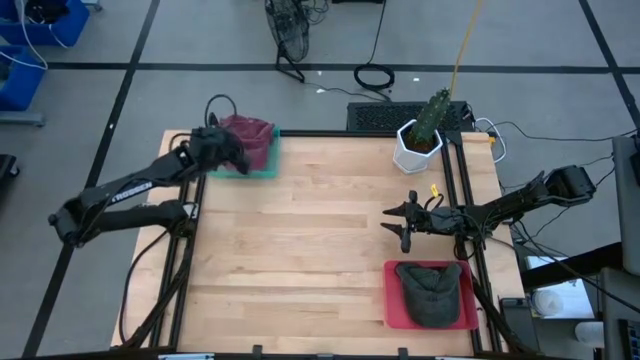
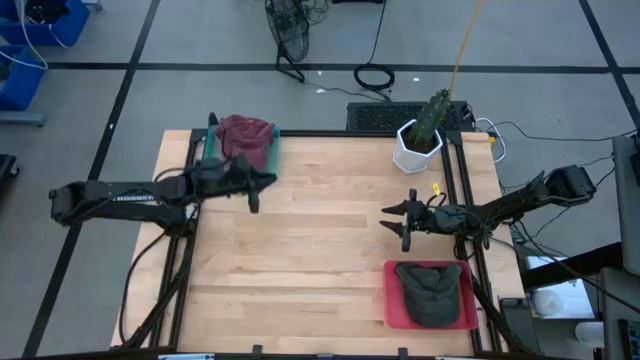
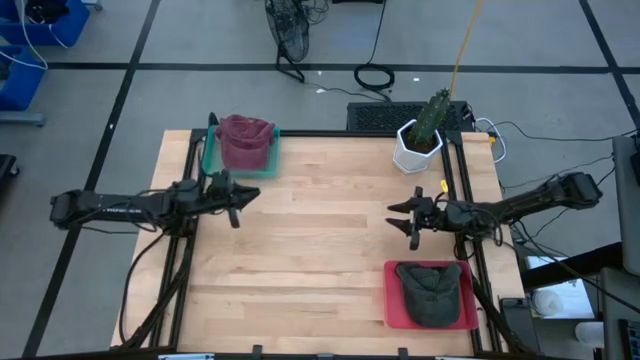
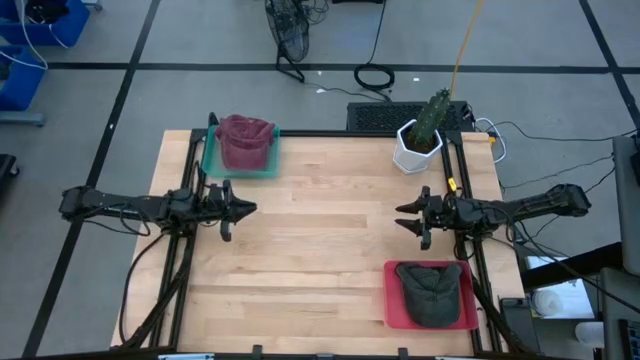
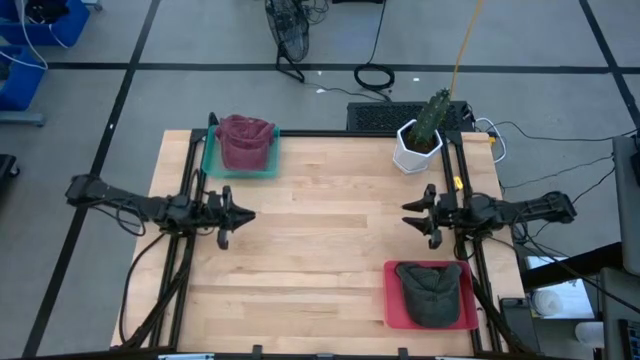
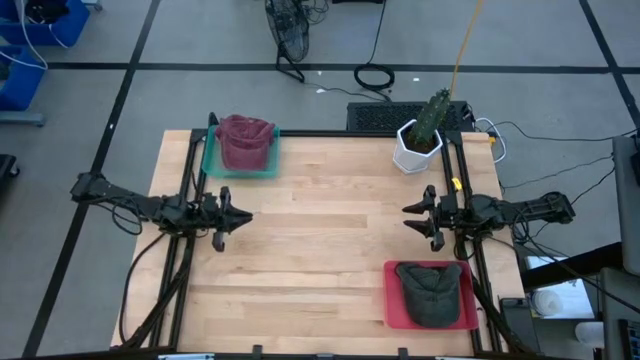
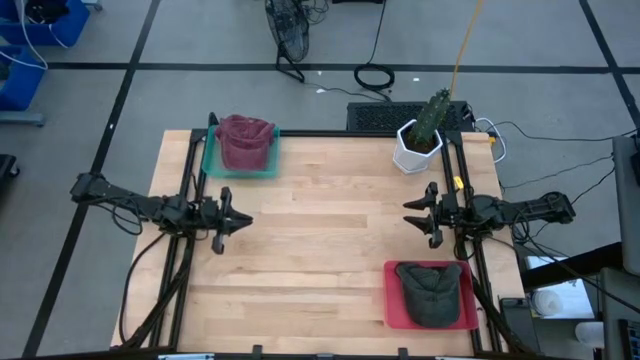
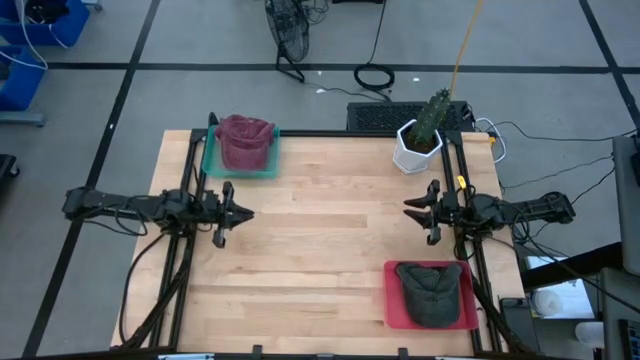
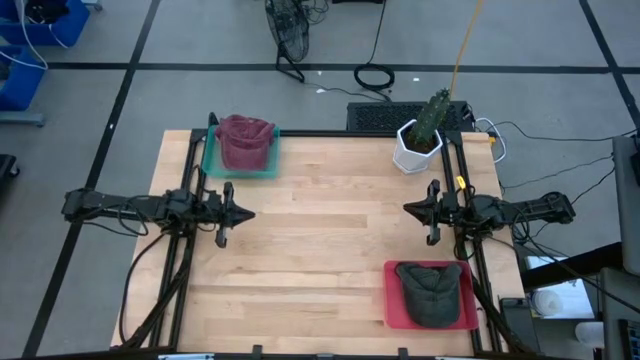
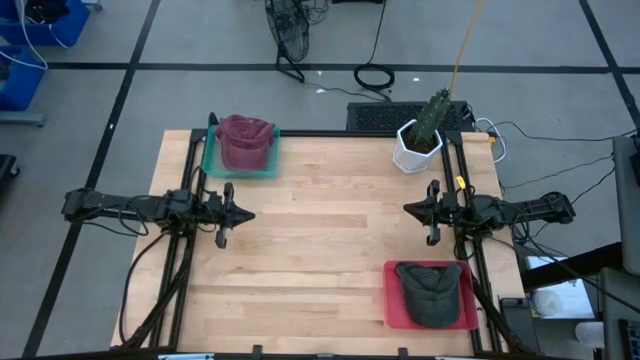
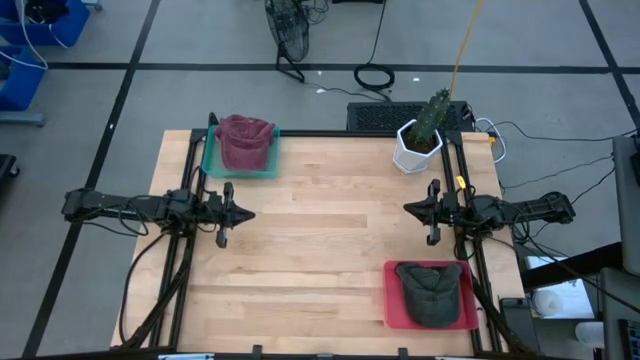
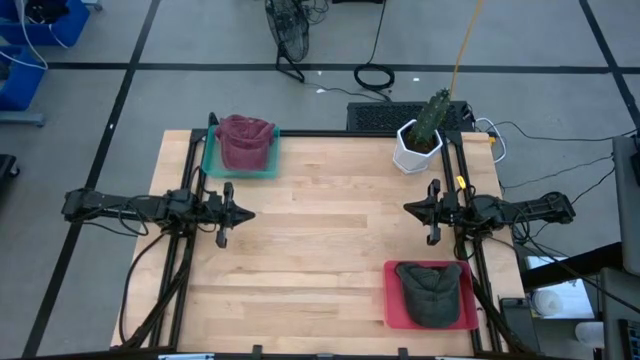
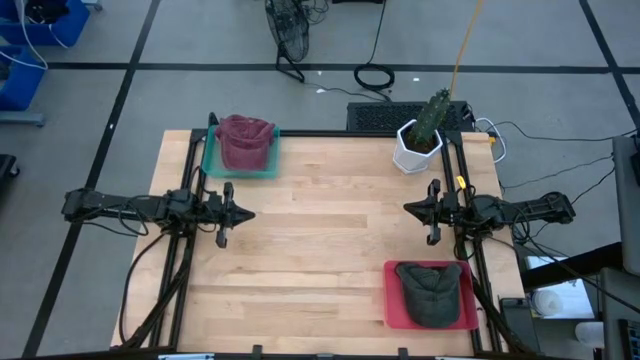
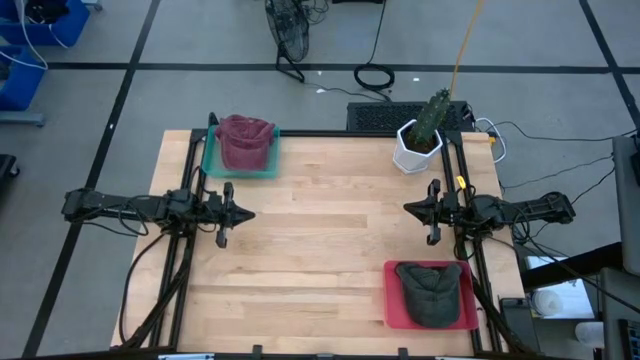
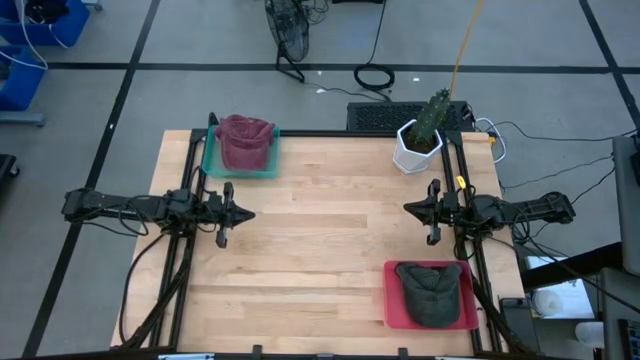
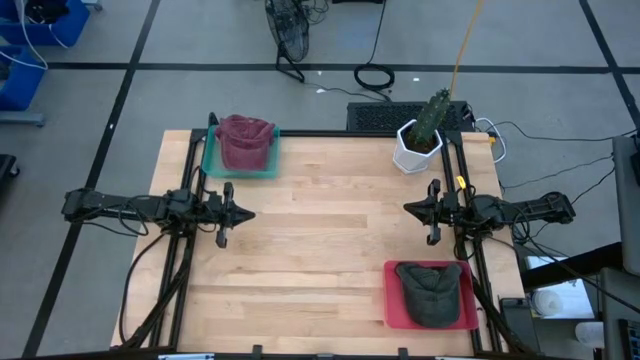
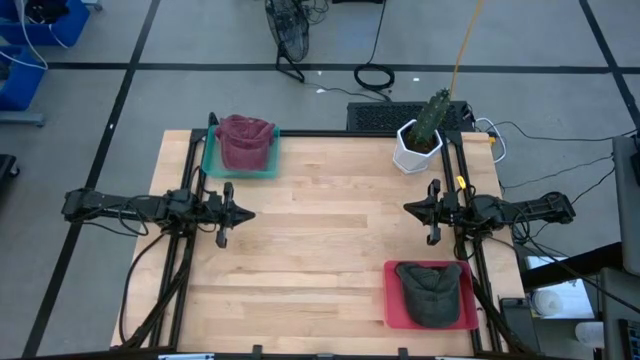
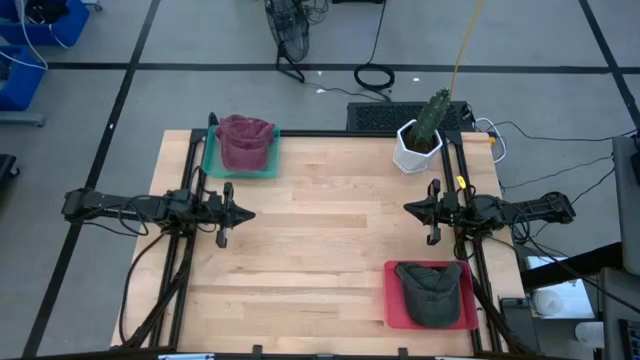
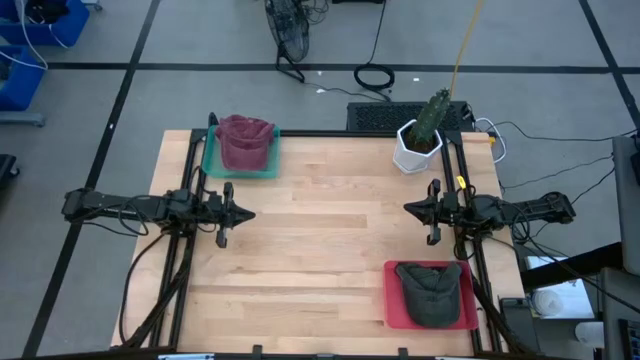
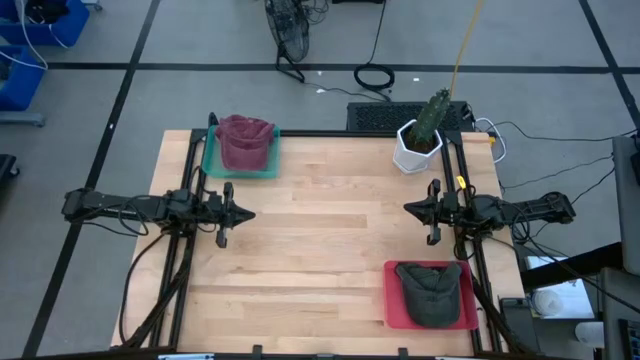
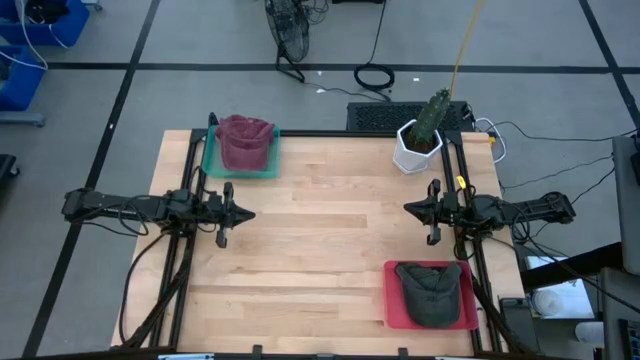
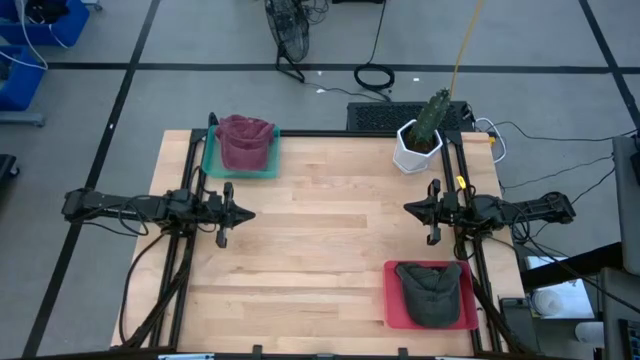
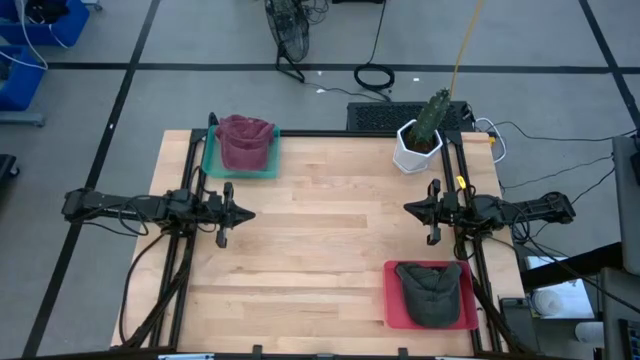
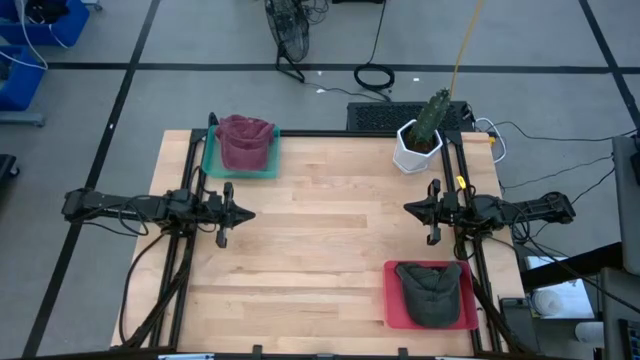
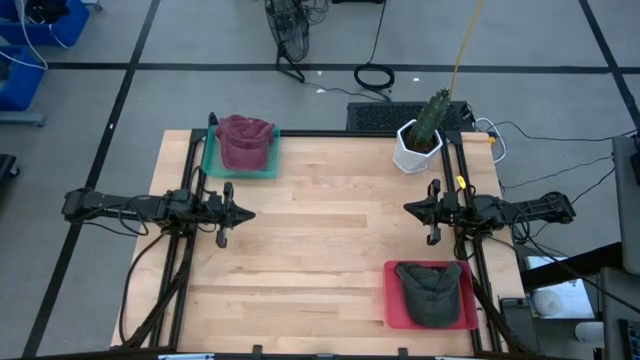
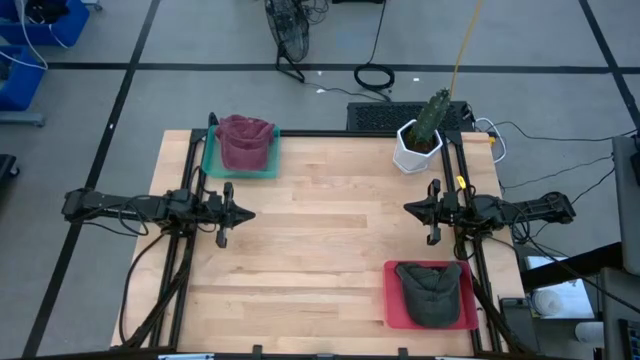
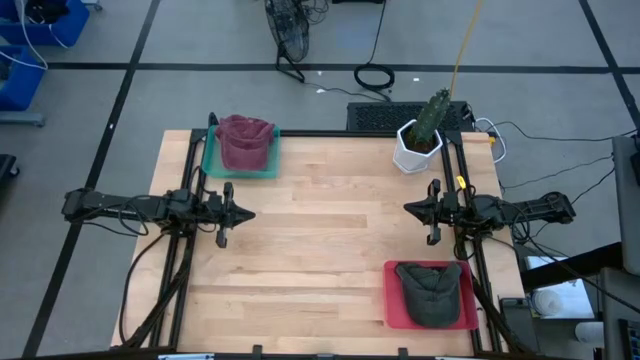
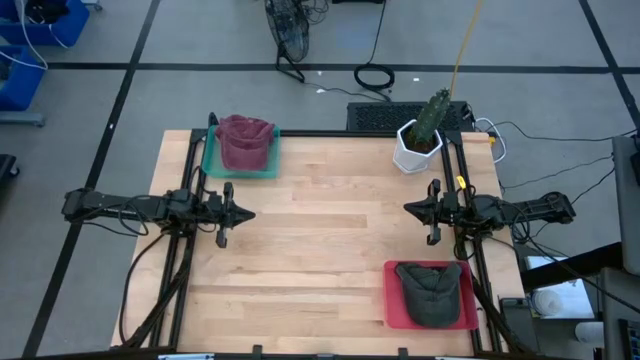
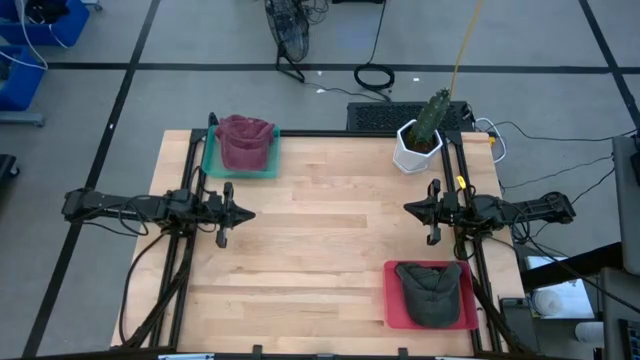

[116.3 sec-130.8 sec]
Task: Pick & Place hat
Return to Home Position

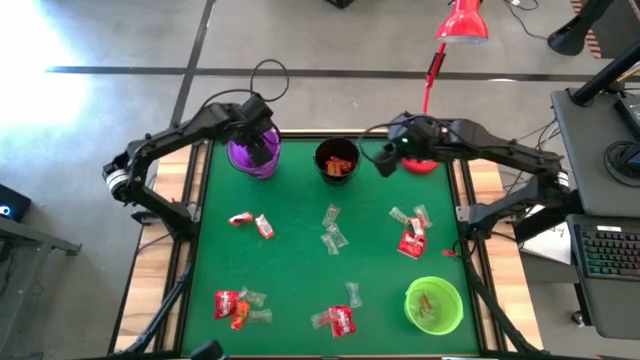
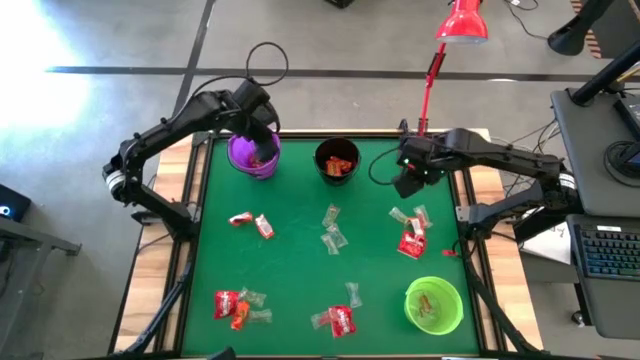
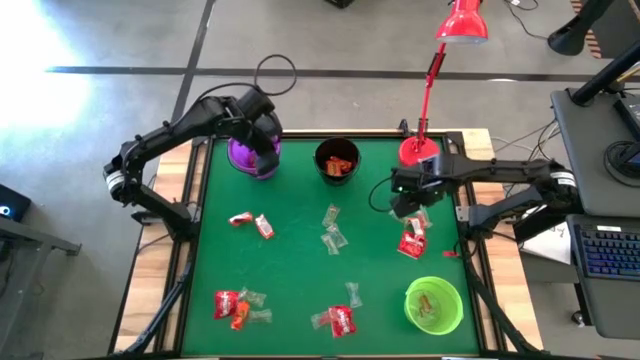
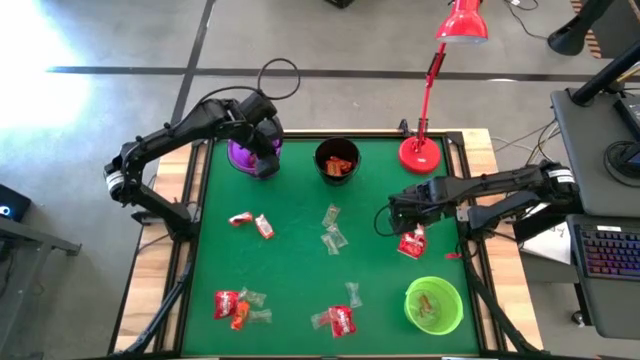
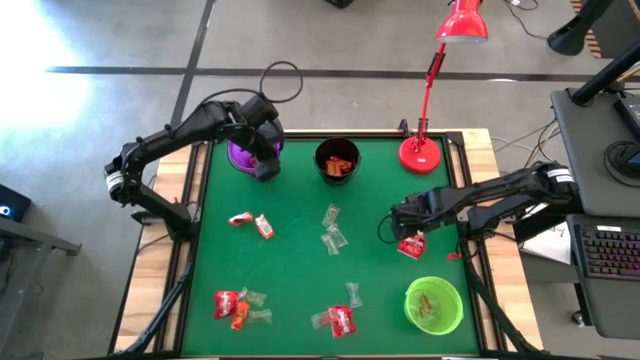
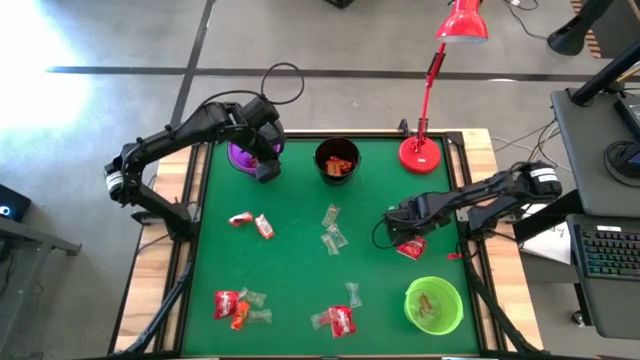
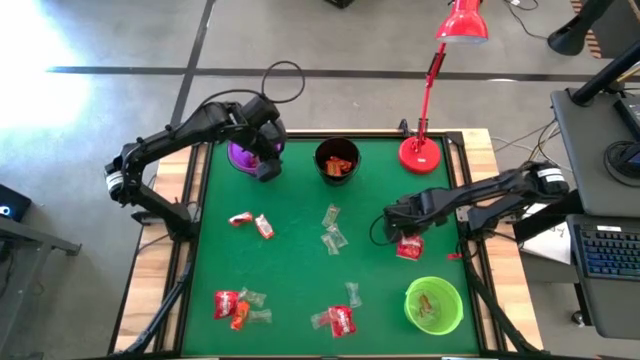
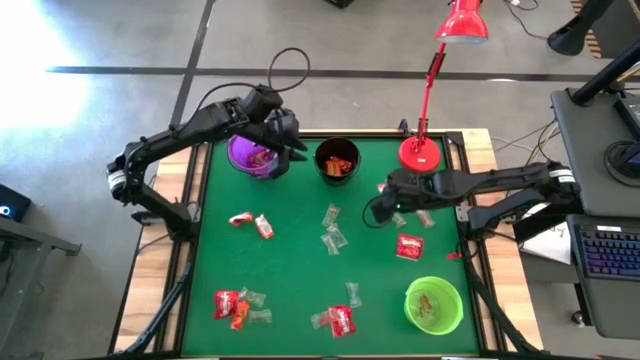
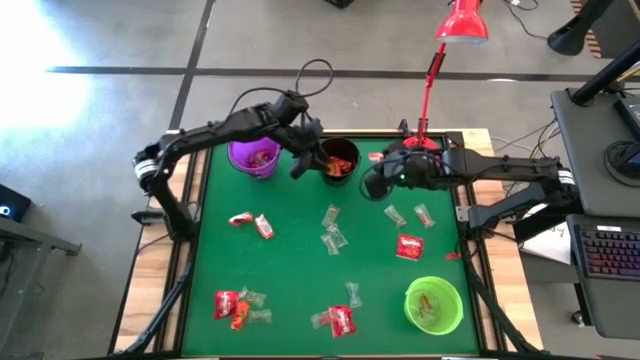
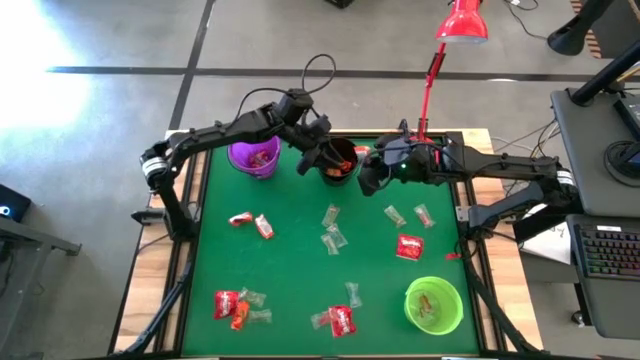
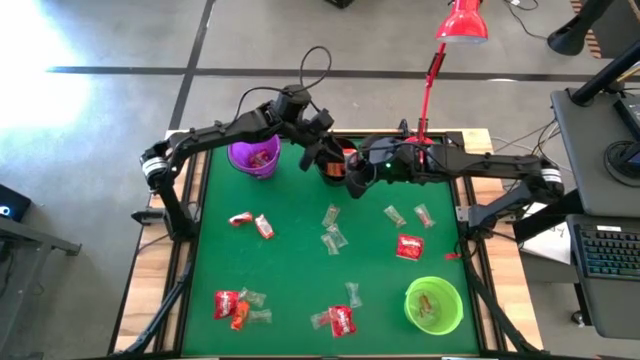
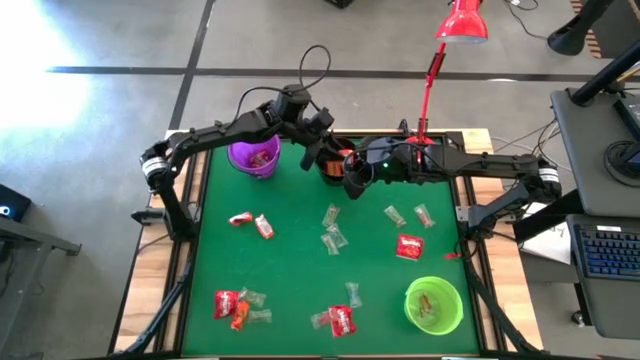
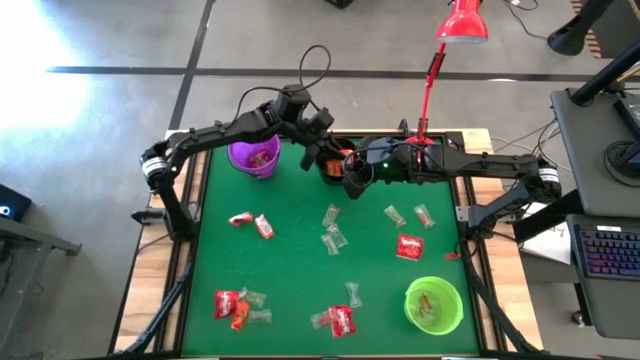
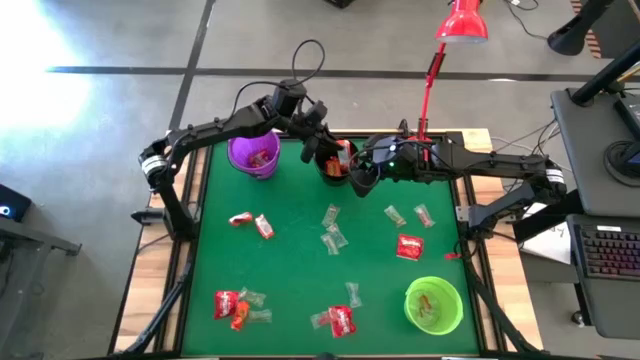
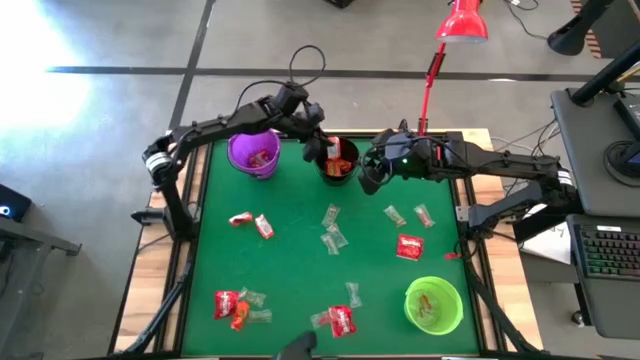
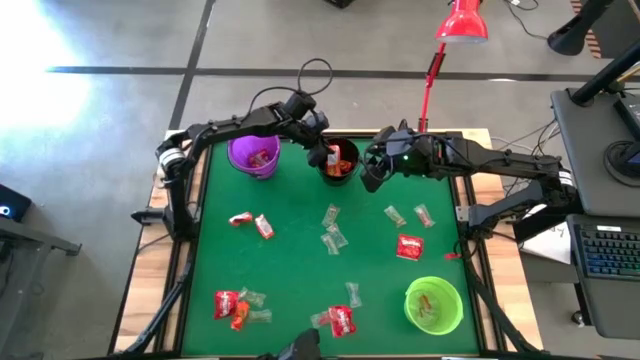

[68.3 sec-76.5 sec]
Task: Sort candy
Put the orange candy into the black bucket
